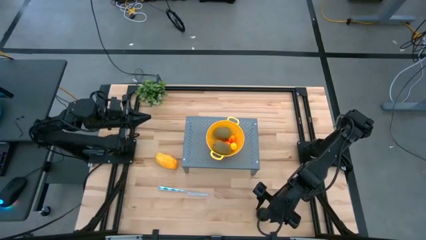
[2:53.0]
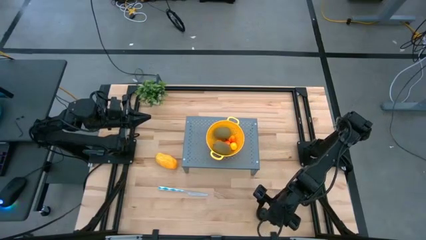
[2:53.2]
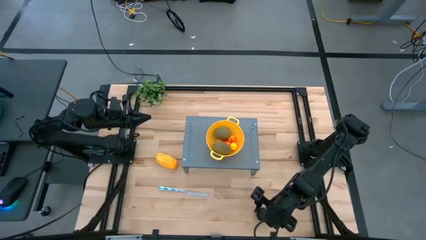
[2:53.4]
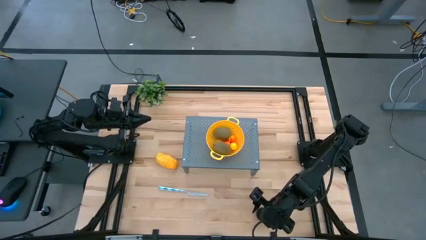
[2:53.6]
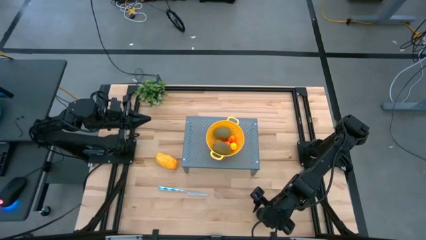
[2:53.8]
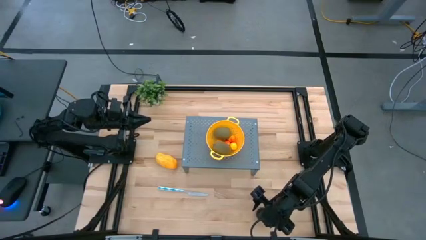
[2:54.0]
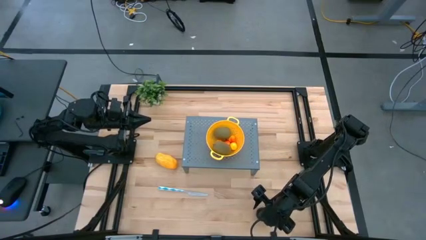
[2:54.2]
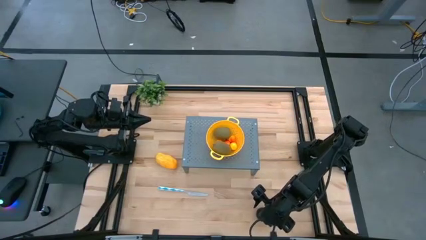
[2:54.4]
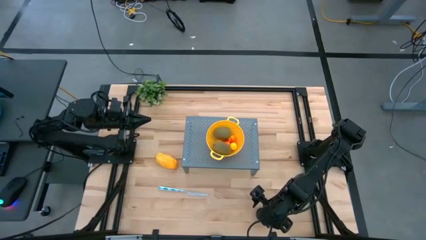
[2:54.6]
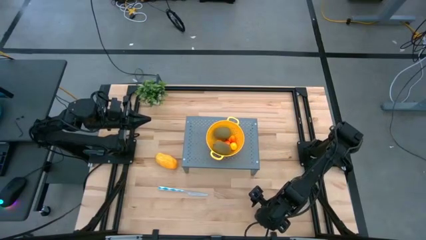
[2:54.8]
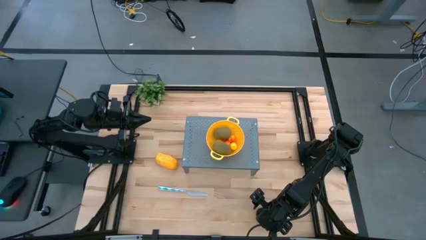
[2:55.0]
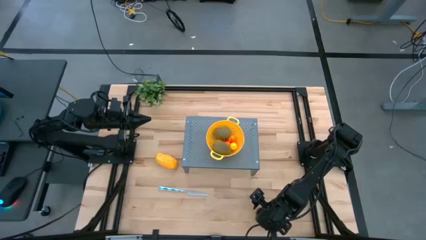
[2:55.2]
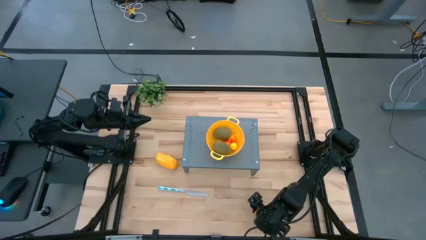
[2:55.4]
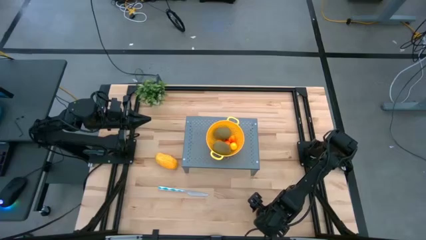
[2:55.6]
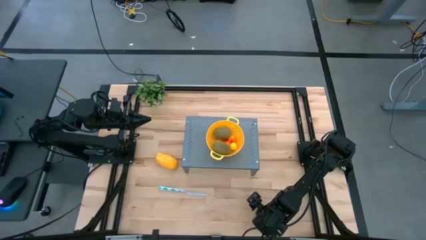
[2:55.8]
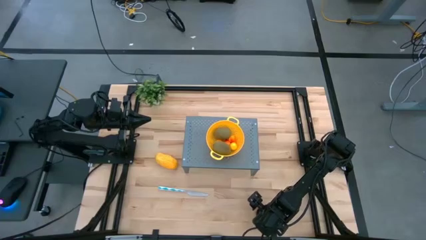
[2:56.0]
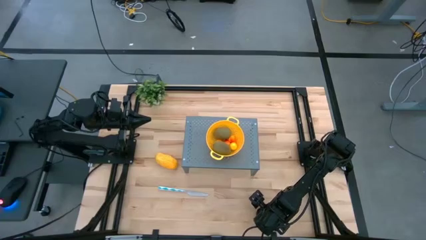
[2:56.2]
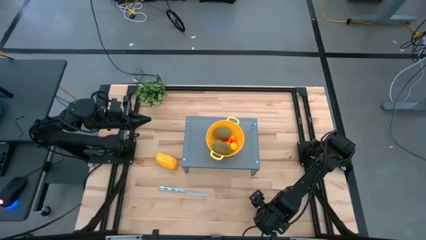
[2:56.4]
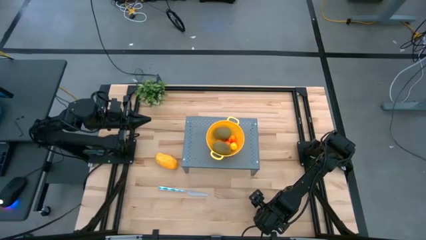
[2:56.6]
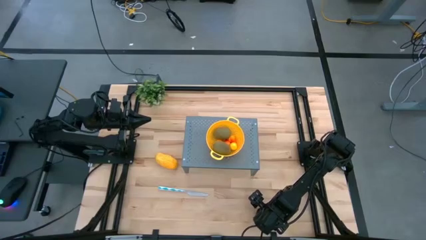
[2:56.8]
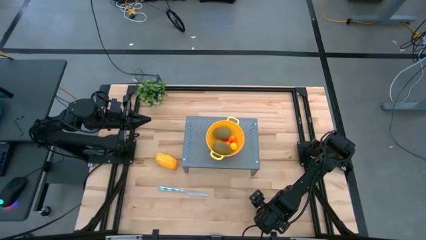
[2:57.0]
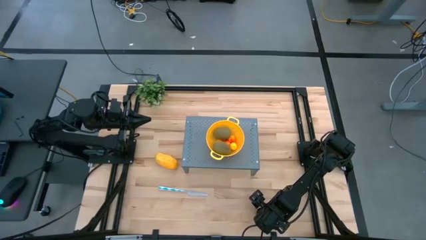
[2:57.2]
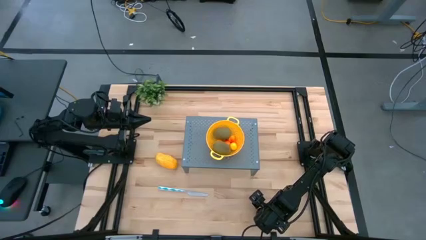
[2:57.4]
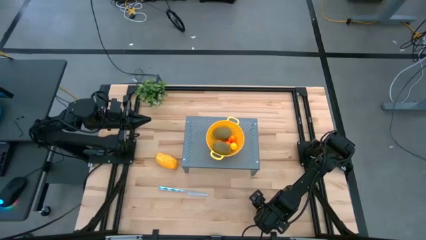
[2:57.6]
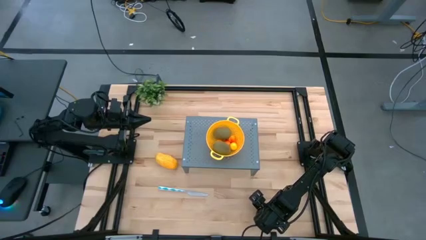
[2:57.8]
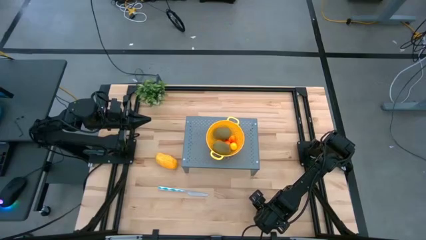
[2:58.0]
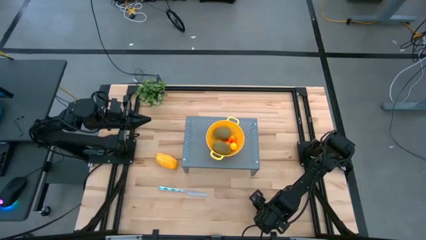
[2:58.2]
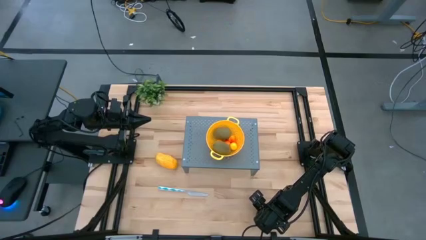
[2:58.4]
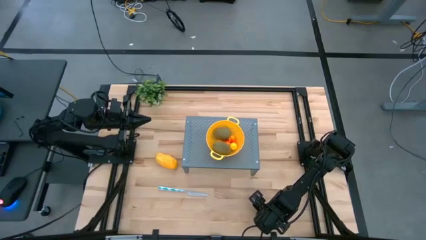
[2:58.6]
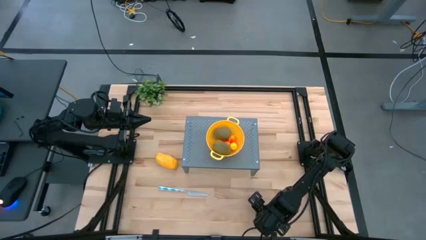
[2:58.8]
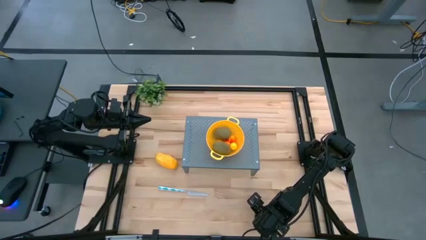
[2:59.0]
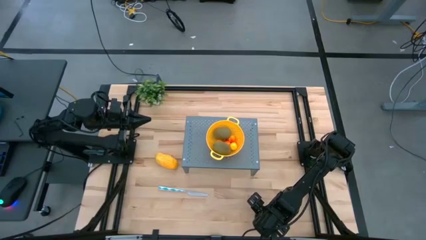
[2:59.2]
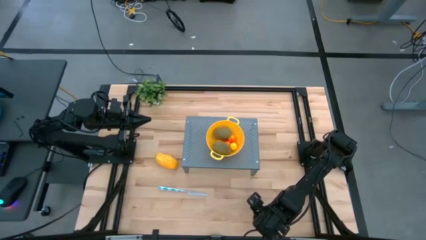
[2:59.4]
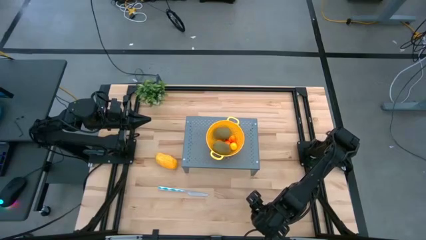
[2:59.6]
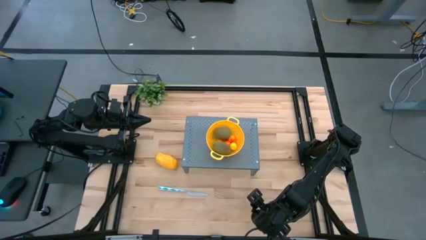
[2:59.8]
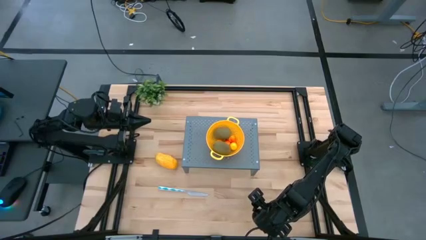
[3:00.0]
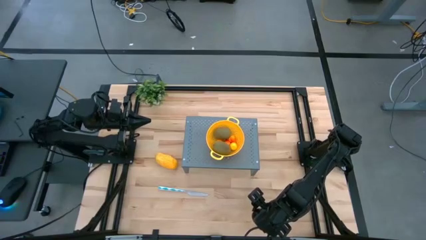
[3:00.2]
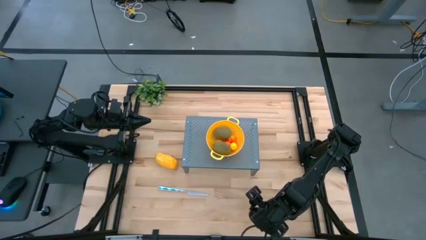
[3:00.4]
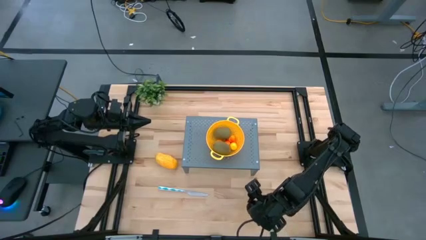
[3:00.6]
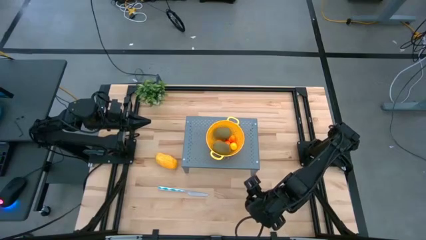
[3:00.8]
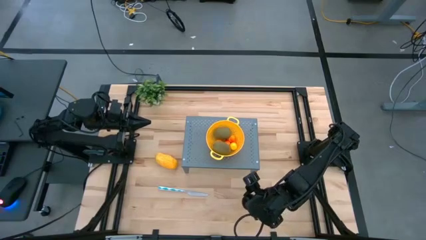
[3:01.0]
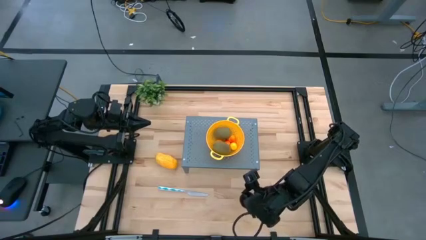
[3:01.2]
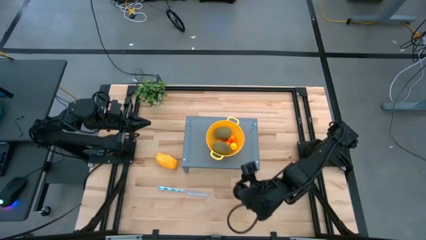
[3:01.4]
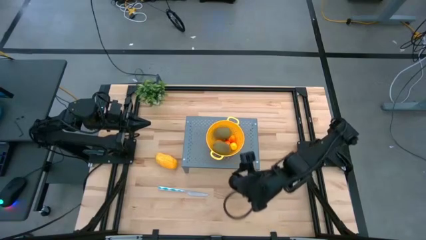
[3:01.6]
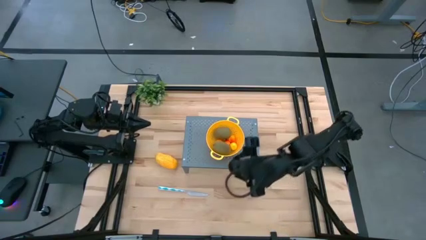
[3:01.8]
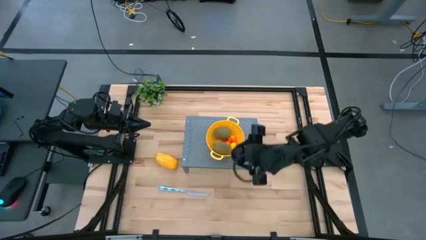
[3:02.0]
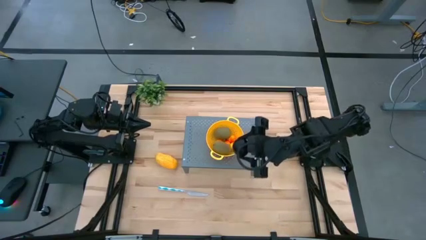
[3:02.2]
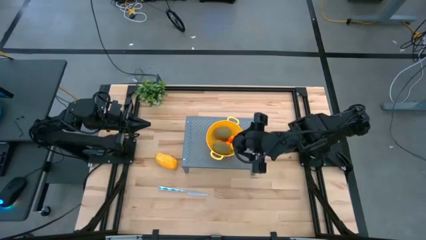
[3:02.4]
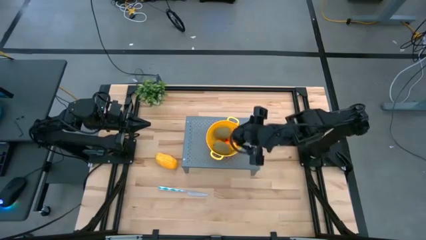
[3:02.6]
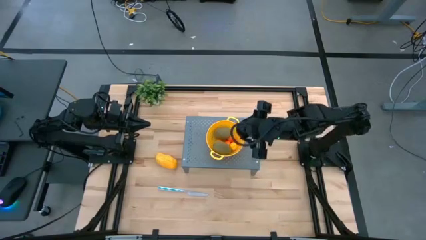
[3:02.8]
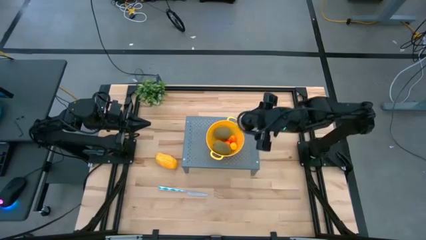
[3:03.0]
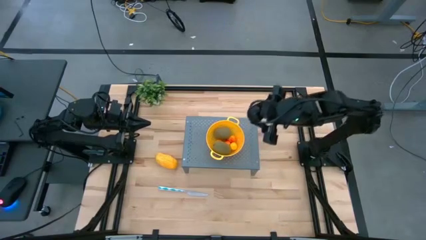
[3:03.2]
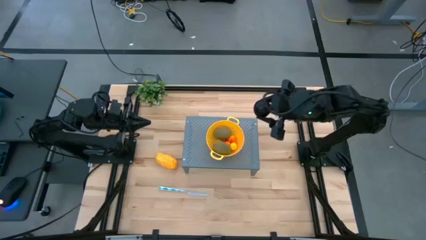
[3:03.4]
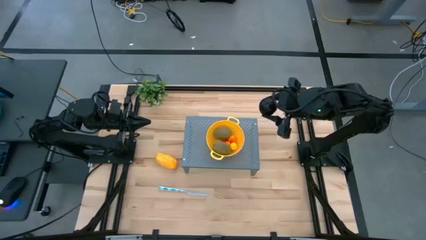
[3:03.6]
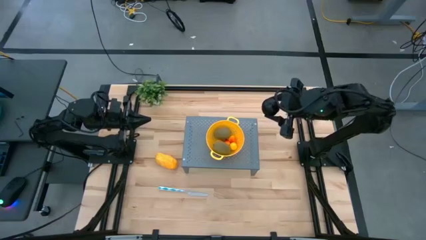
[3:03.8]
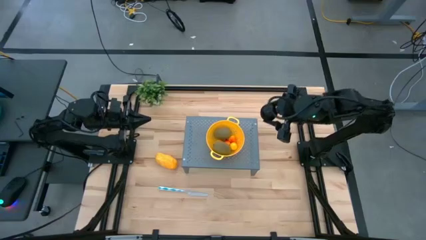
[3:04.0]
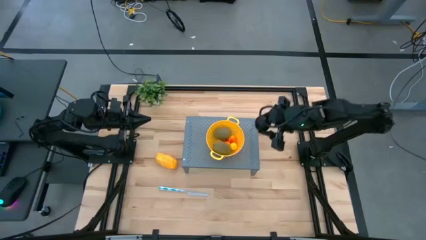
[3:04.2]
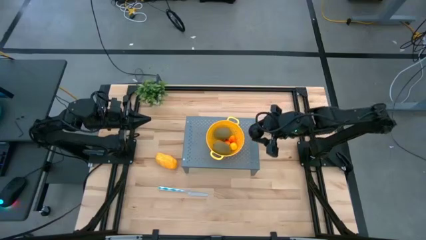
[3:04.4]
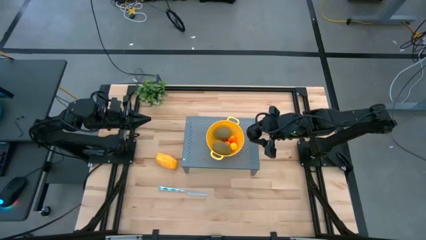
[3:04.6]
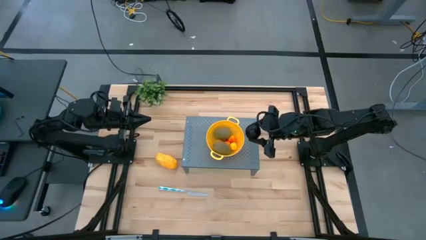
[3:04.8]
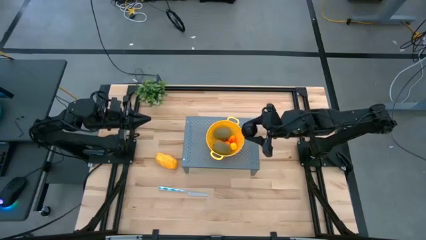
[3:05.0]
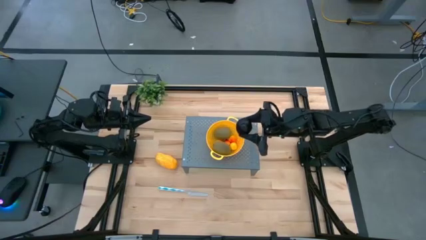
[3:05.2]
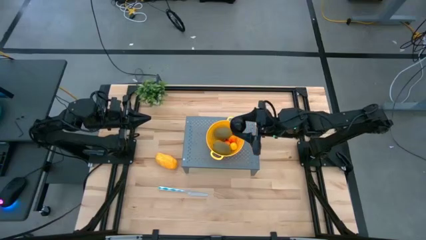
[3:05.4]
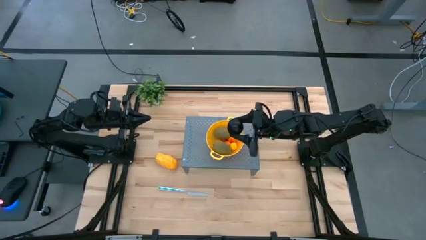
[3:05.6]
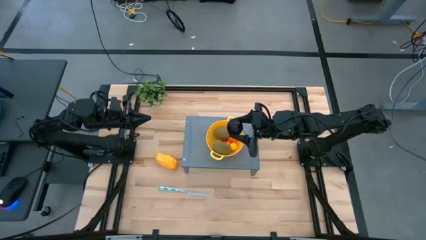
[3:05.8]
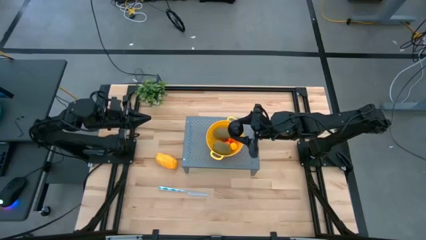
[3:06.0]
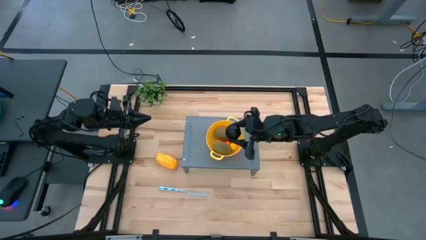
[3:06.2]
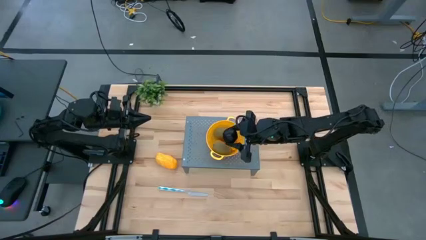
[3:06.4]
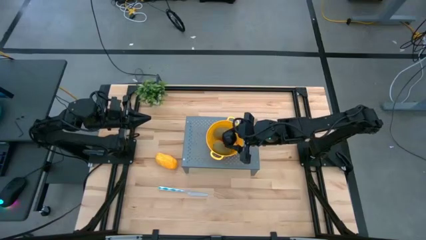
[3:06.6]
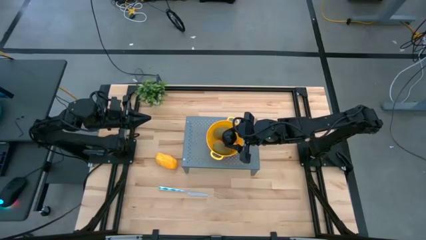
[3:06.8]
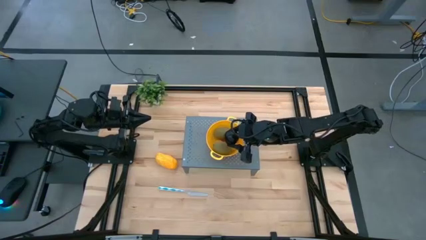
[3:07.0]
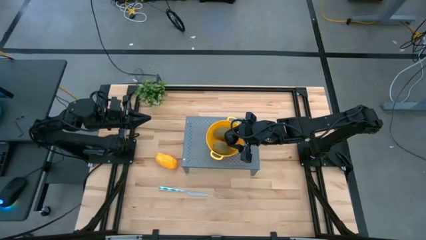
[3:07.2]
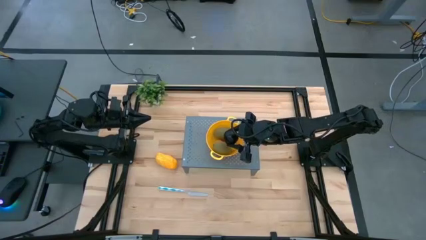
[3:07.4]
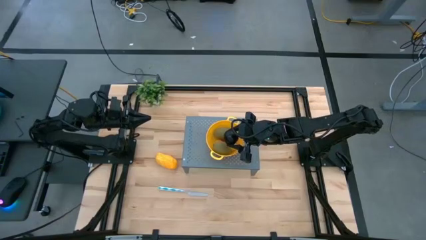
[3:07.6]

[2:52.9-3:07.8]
Task: Pick & Place Fruit
Put the plum into the strainer bowl on the shelf

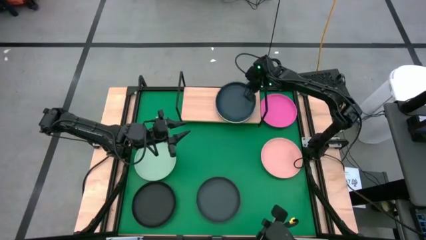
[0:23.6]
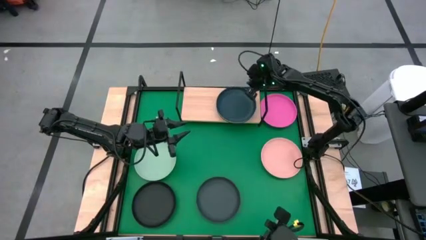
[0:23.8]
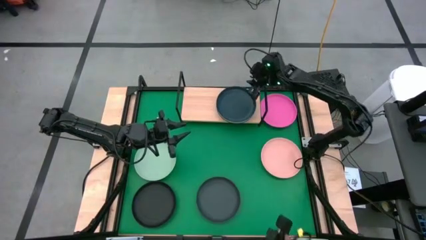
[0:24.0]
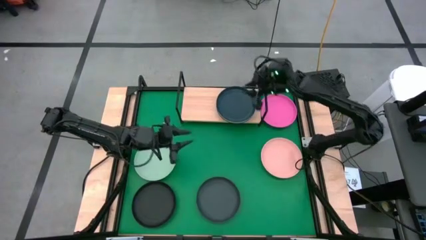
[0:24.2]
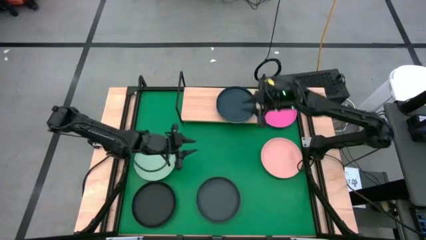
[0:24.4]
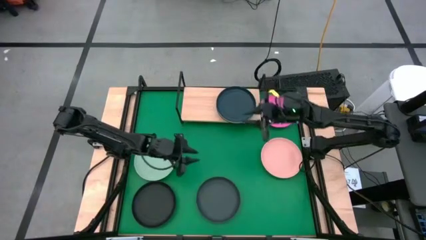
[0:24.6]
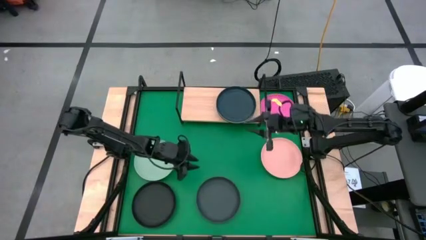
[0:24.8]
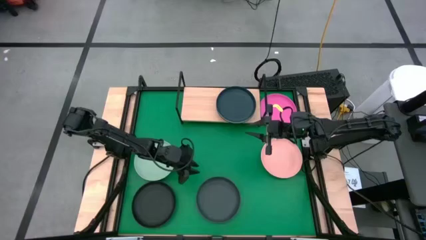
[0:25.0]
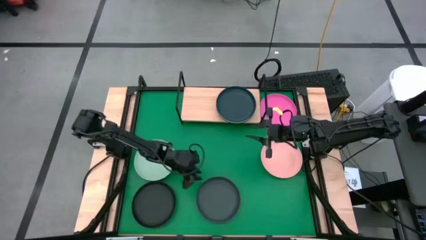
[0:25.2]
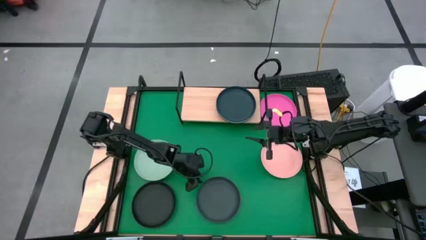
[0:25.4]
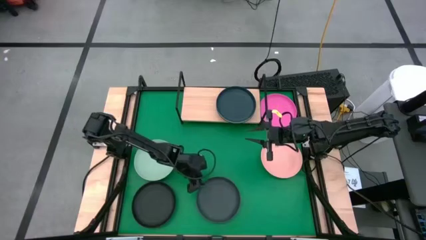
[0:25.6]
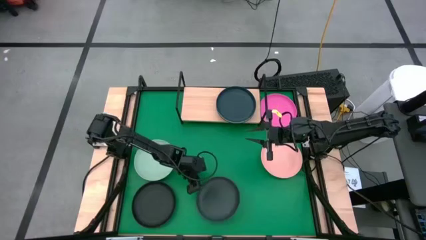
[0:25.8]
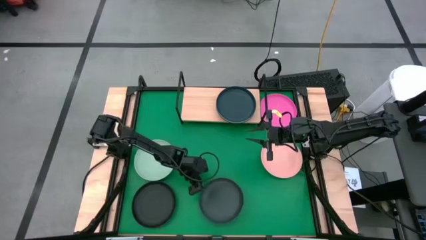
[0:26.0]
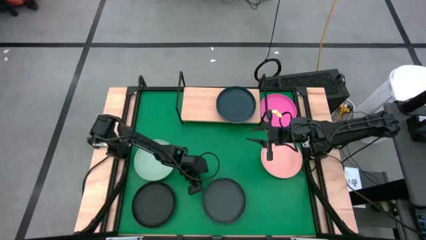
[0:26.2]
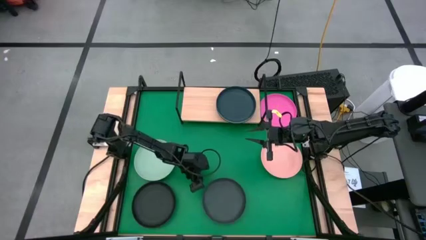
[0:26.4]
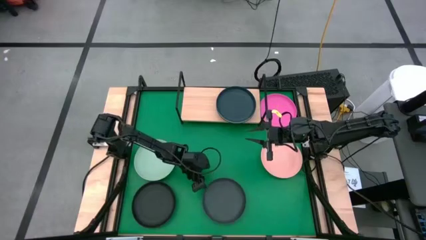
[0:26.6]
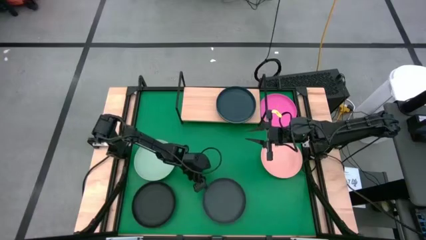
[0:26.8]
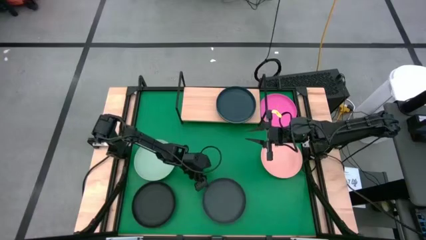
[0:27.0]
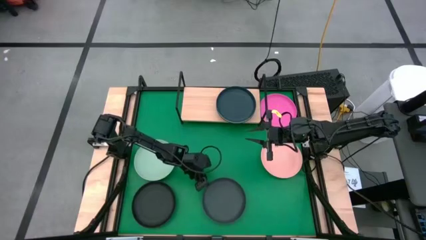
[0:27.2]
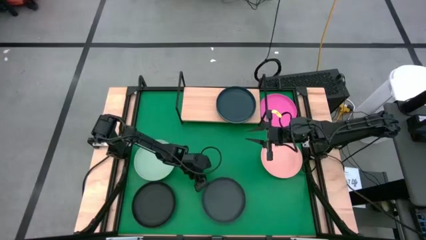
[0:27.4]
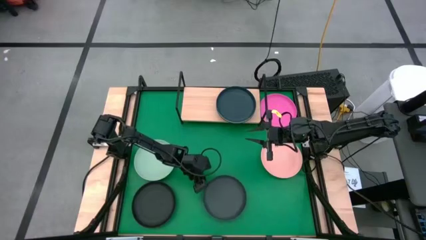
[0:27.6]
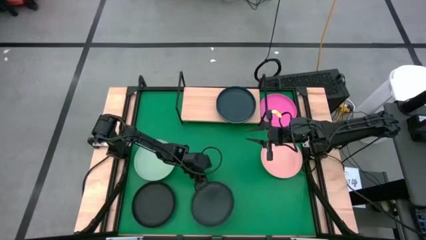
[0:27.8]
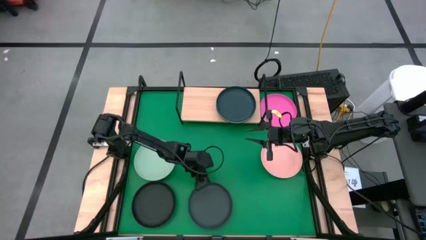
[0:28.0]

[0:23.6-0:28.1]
Task: Place and stack plates onto a shelf
Stack the right black plate on top of the blue plate on the shelf
